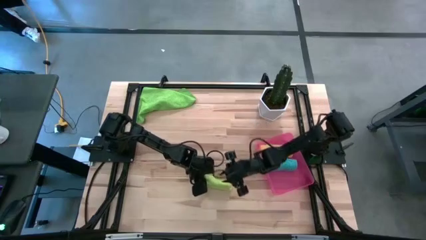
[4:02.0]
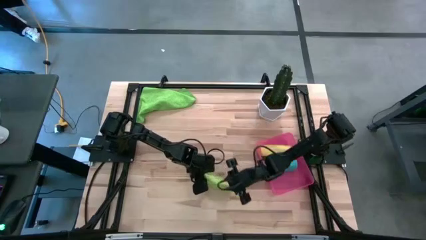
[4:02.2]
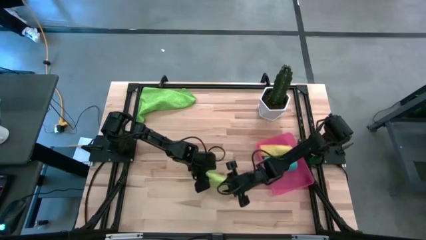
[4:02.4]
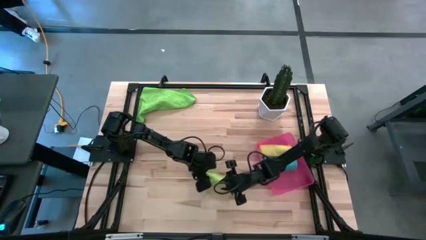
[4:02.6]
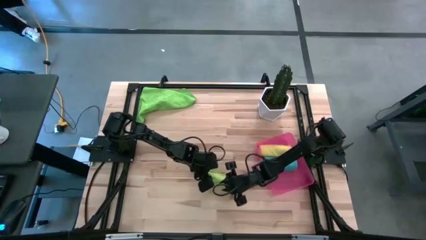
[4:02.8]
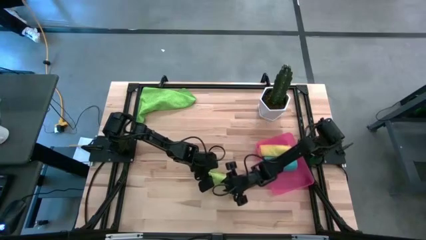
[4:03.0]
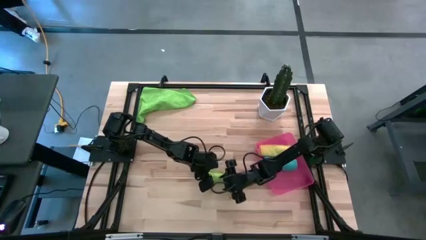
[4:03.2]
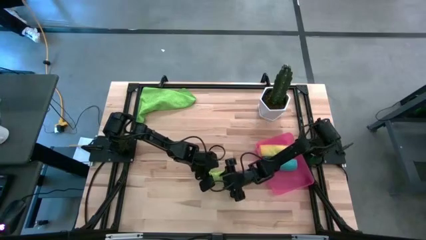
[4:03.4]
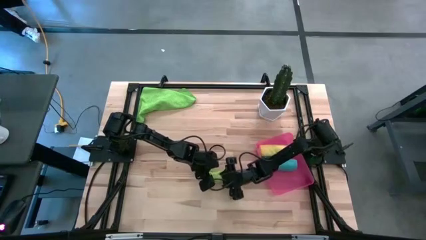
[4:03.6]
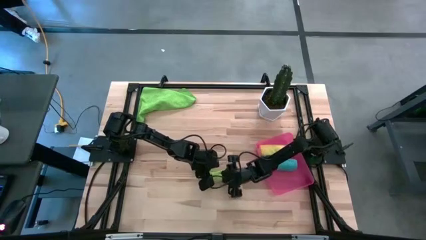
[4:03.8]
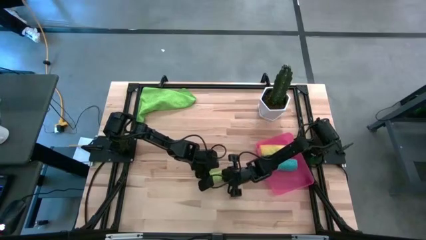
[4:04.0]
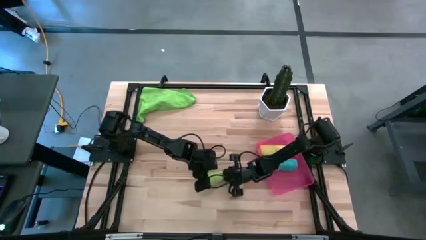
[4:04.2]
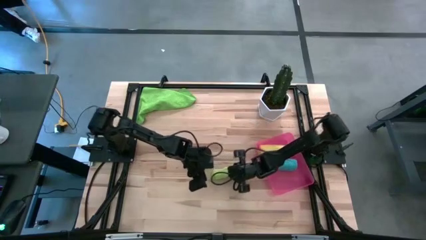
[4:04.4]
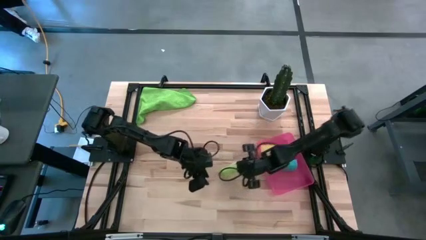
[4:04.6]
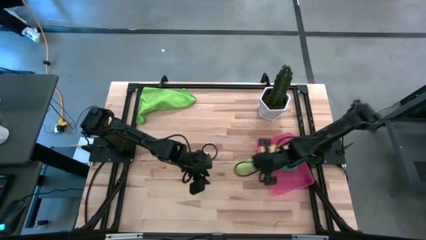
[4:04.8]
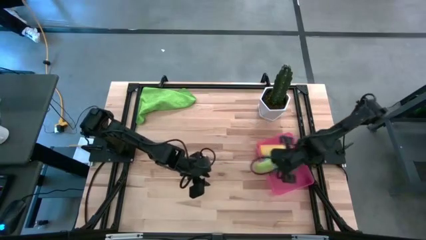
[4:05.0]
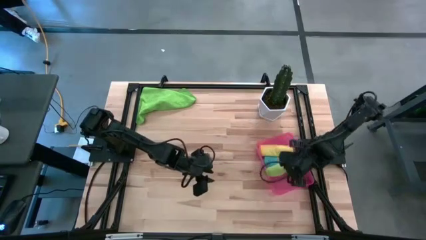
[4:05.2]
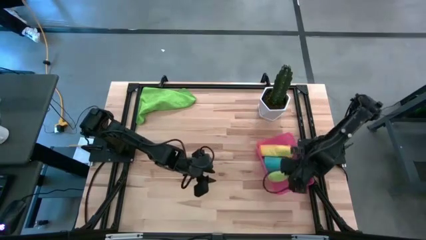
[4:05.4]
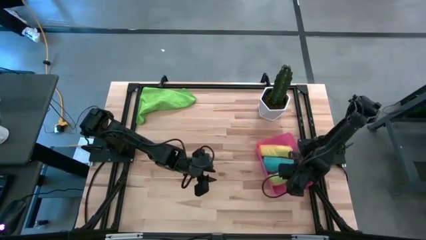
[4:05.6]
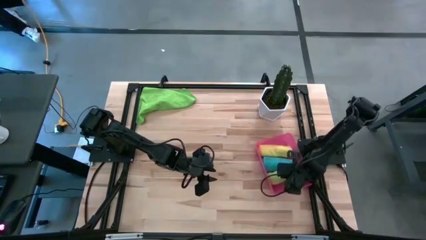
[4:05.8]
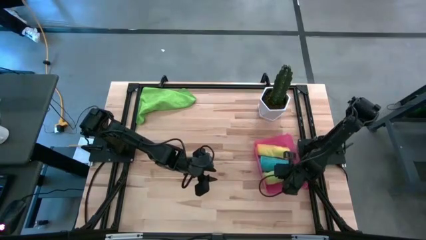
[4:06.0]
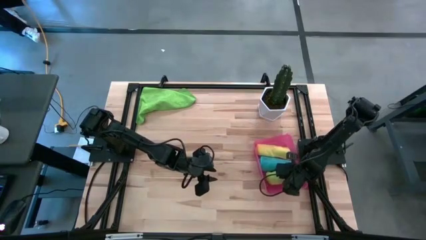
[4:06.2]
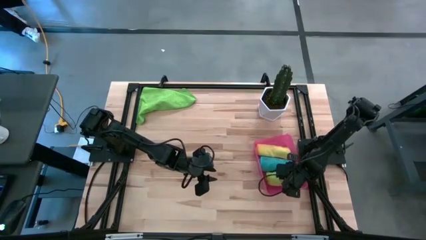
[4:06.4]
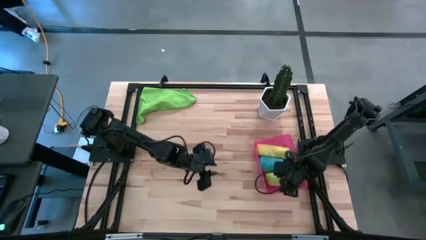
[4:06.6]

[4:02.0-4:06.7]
Task: Roll microfiber towels into tight, uniform cylinder then place into a basket
Put the bottom light green microfiber towel in the pink bin

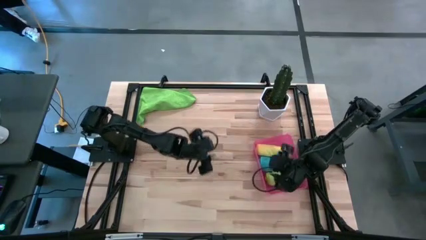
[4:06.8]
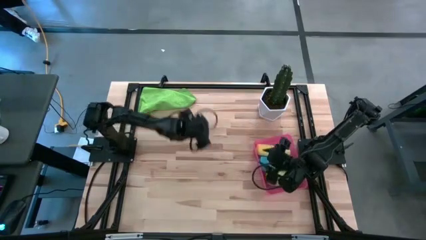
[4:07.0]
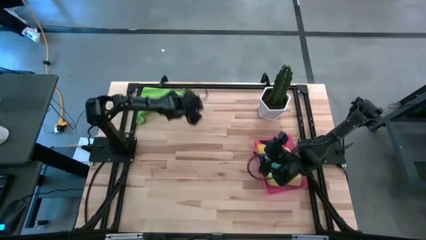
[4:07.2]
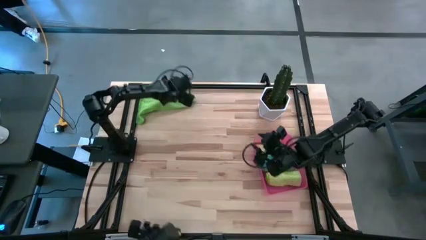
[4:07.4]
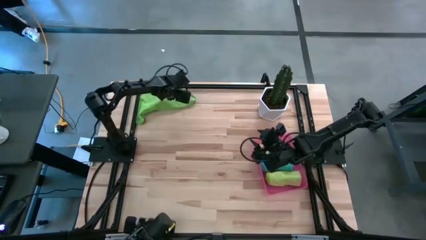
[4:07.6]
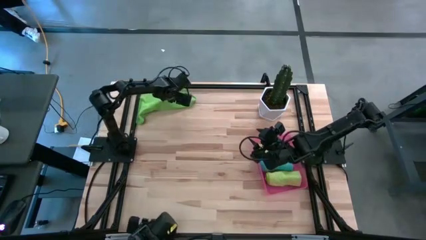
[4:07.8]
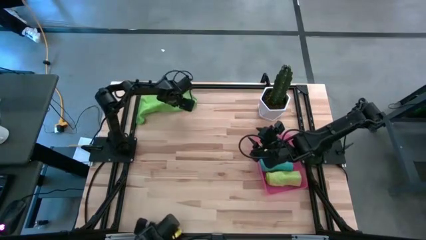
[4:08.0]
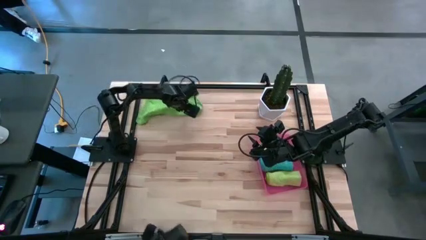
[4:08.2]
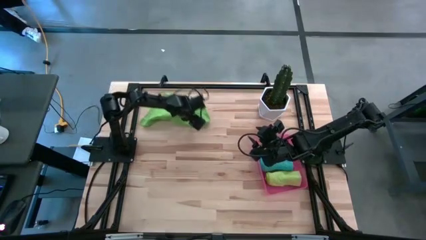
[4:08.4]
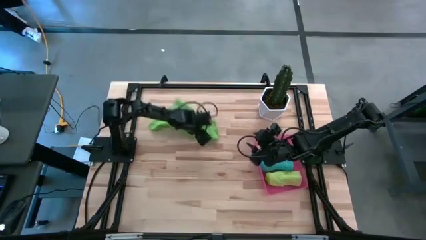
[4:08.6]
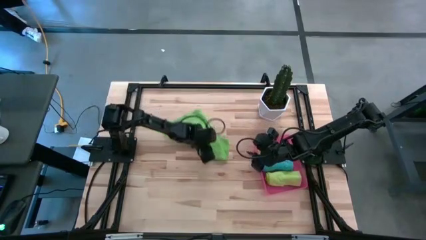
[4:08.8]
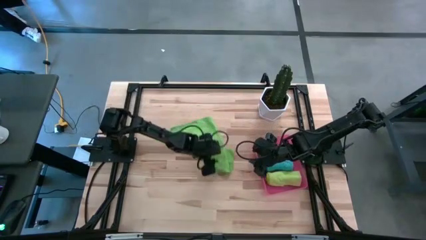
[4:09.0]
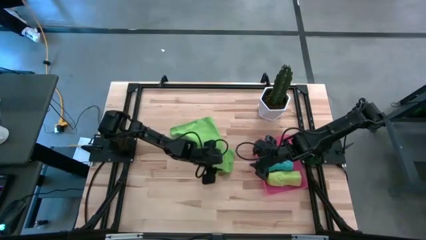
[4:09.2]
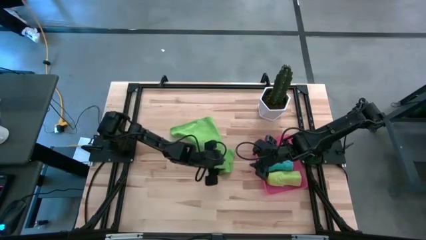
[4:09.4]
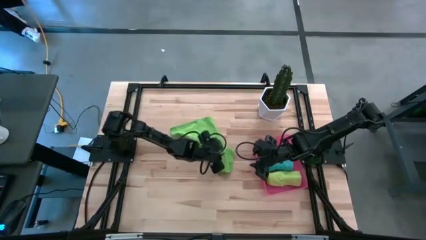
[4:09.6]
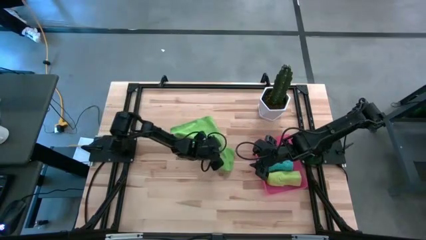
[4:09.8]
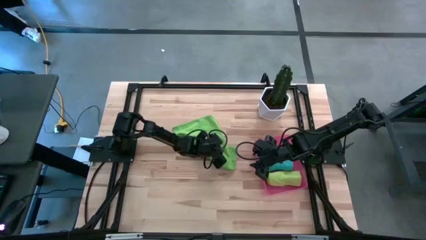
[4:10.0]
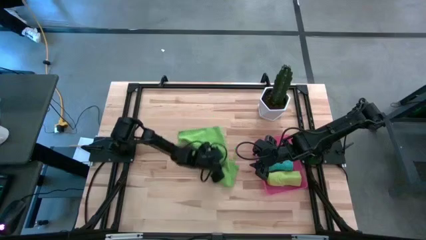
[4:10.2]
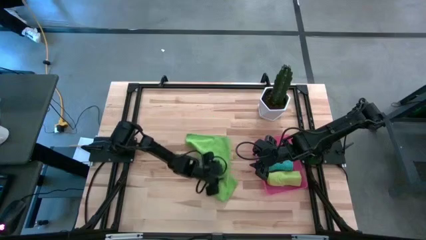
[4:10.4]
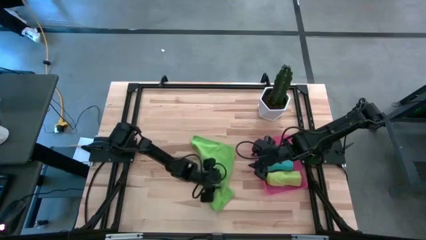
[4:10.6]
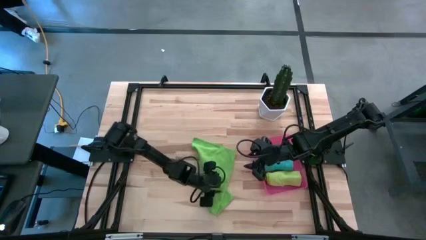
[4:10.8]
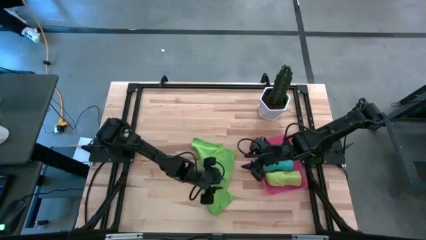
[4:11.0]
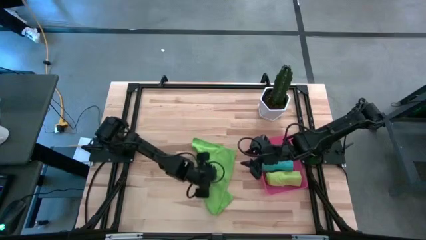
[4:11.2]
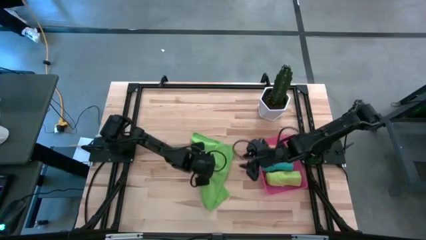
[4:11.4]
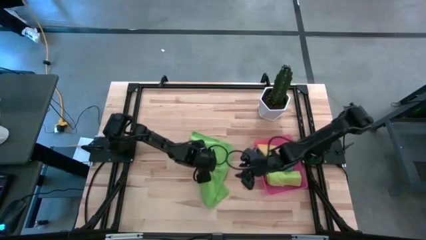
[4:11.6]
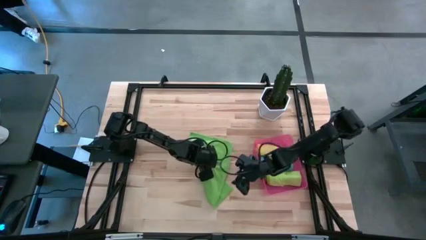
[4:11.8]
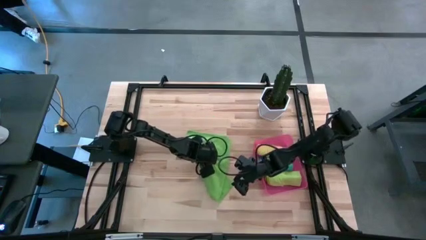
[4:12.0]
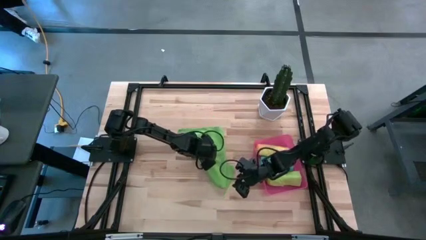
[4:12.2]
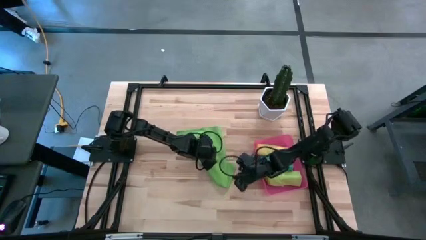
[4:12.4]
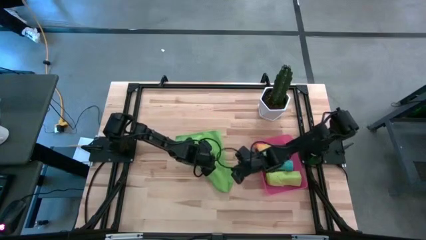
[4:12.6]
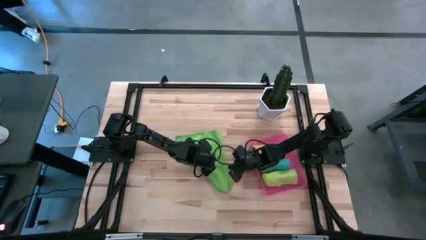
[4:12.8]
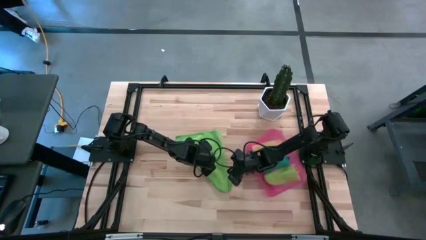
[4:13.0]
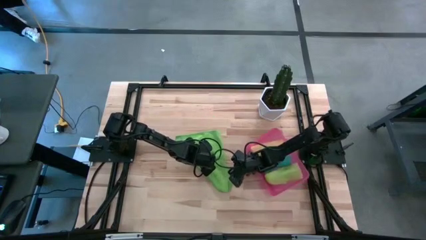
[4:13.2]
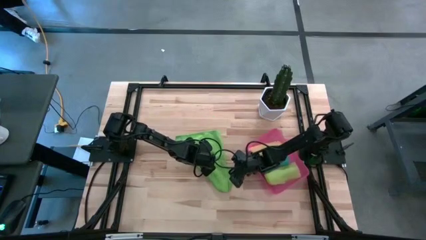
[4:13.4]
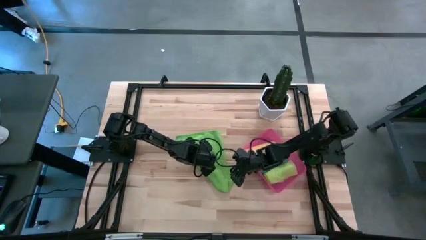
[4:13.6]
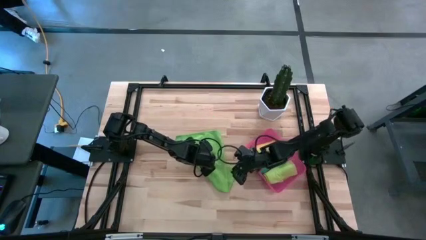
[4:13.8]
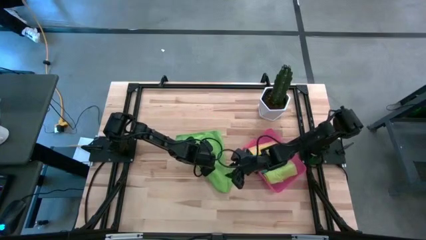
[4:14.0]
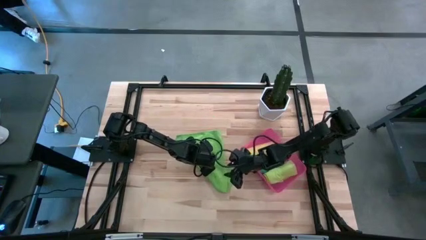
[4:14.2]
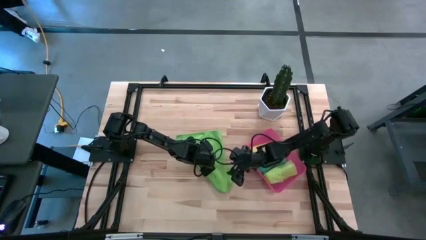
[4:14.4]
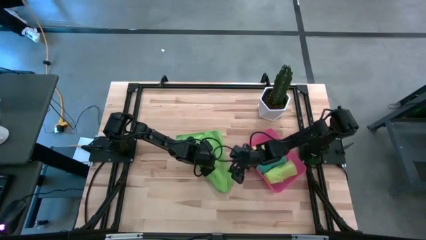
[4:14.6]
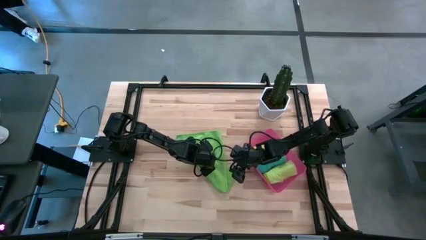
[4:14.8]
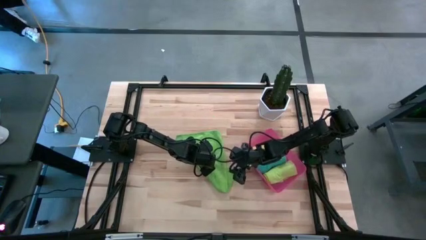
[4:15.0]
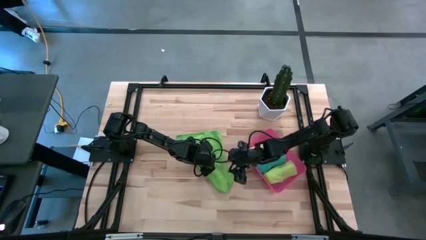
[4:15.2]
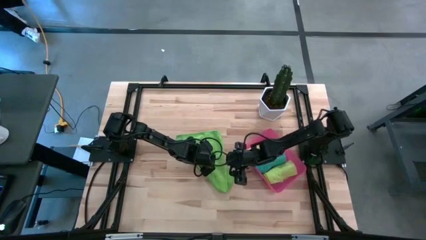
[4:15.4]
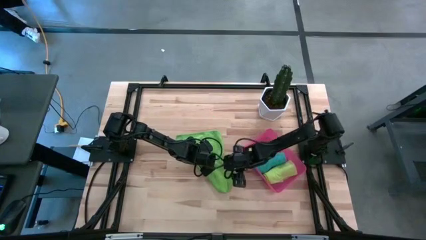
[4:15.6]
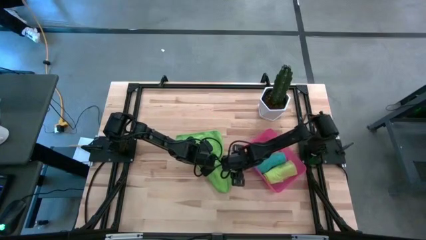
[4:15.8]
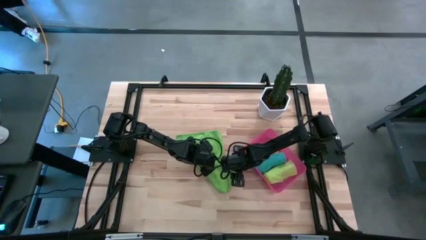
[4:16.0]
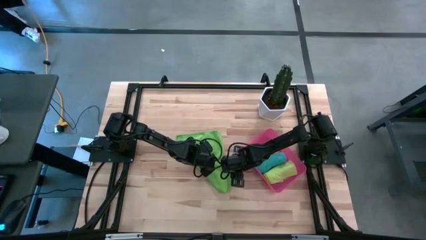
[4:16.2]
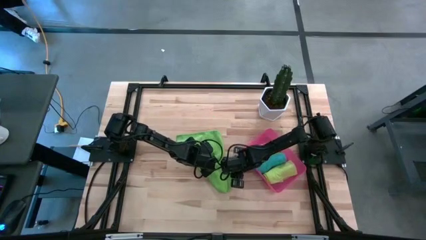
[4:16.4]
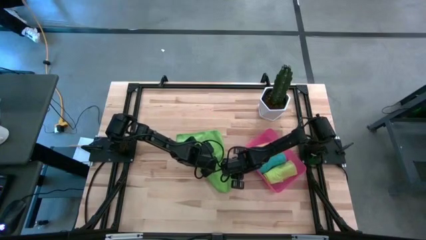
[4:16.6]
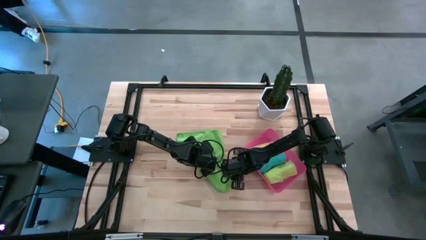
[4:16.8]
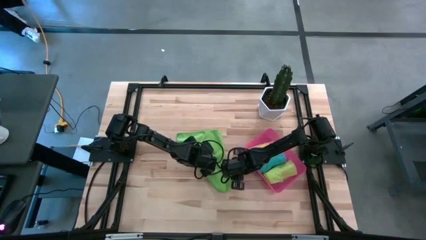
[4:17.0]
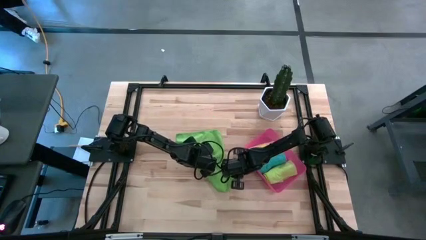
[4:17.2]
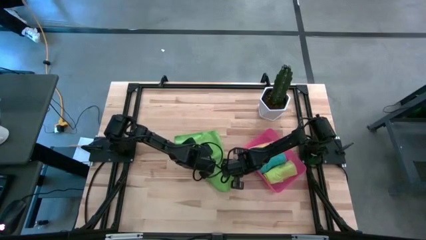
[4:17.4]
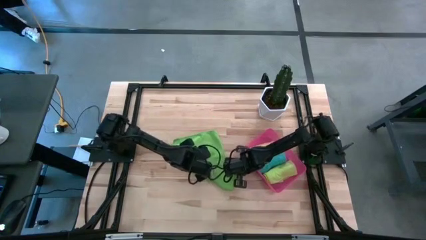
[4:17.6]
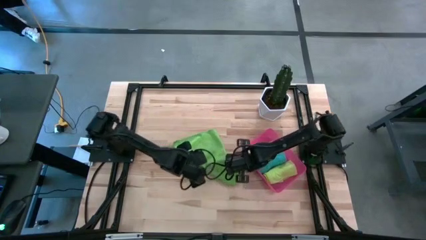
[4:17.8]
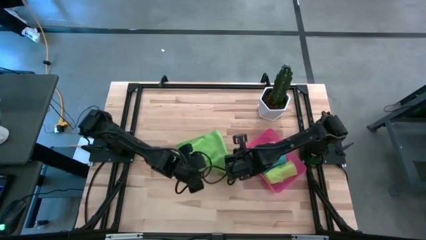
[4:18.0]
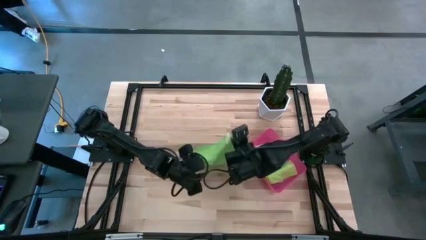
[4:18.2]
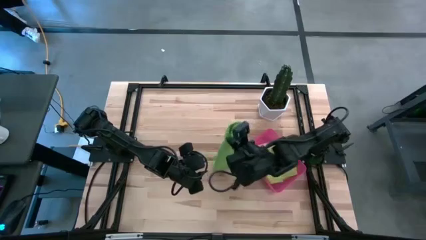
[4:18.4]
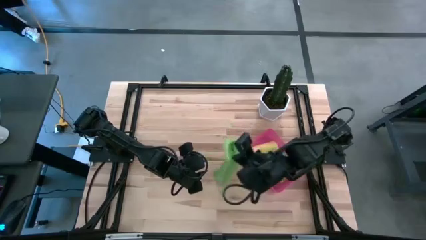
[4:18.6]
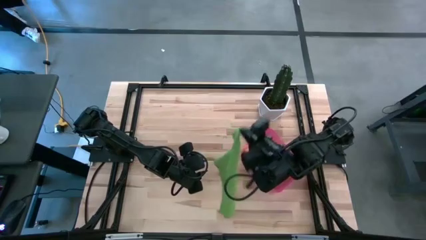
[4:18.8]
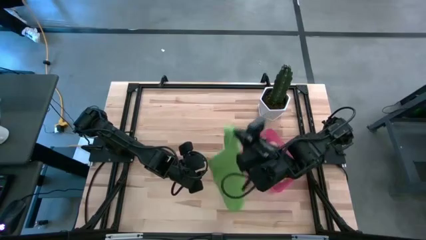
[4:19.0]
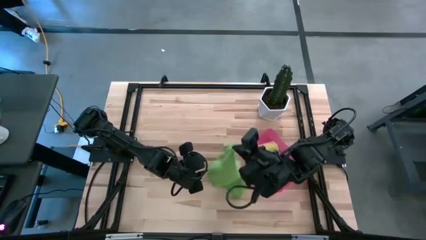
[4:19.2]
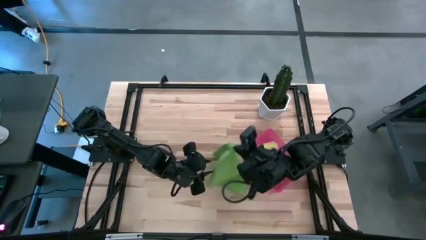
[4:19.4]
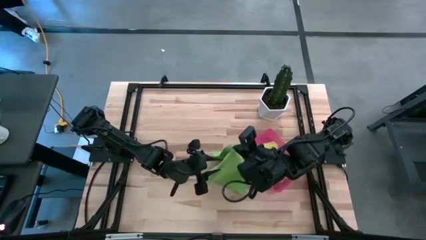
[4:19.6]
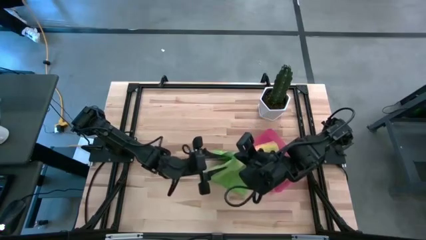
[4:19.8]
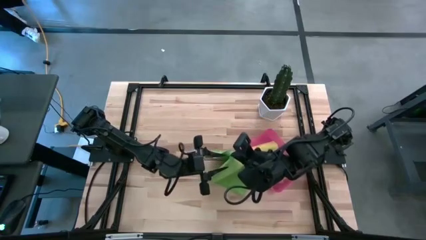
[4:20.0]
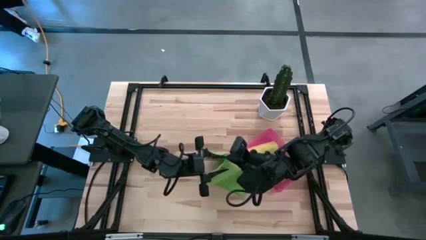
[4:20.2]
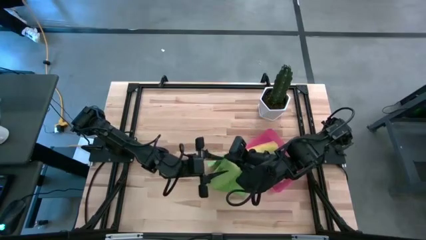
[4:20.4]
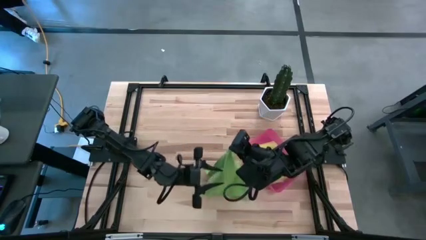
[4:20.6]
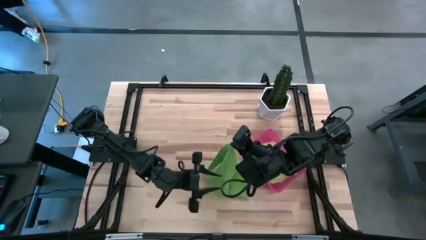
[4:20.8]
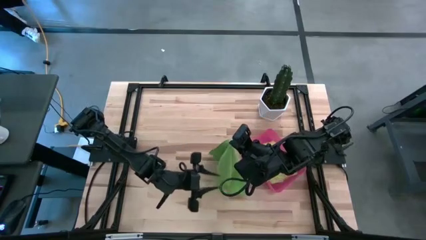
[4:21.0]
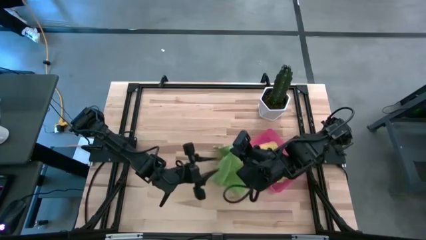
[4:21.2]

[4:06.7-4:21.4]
Fold the green microfiber towel
